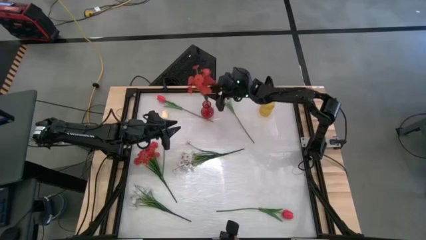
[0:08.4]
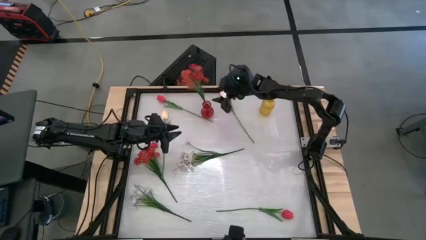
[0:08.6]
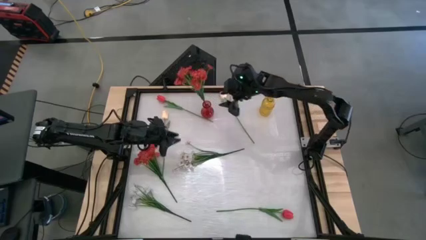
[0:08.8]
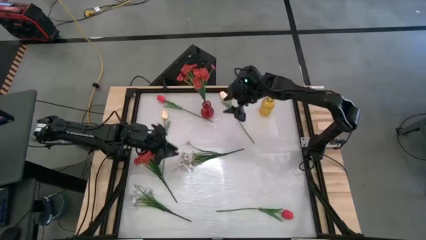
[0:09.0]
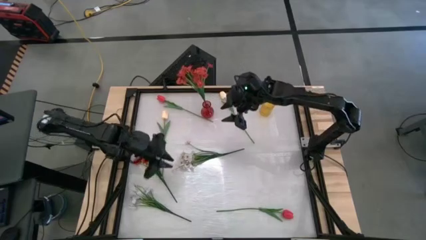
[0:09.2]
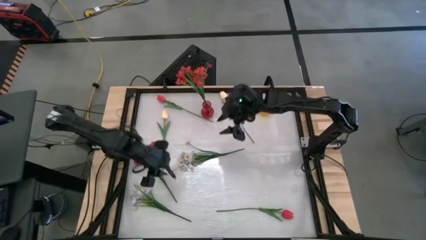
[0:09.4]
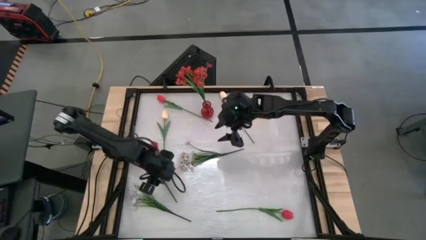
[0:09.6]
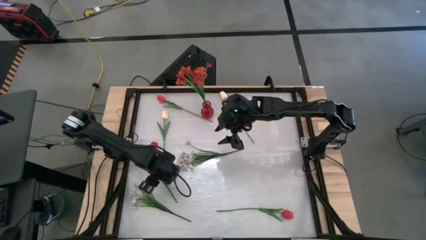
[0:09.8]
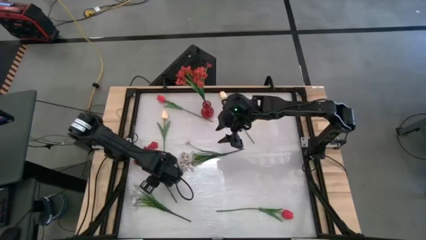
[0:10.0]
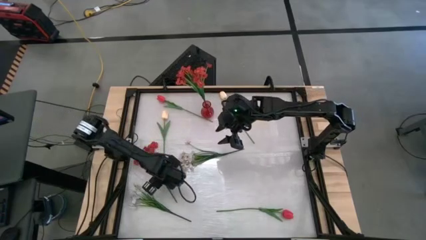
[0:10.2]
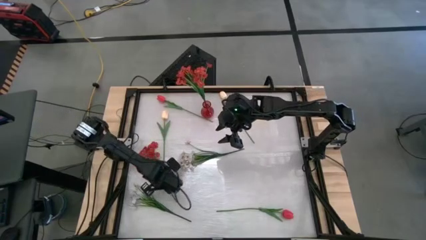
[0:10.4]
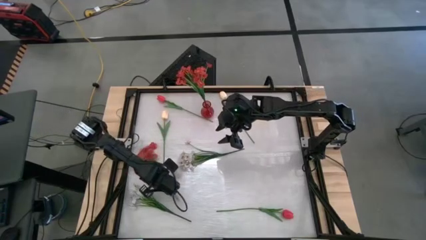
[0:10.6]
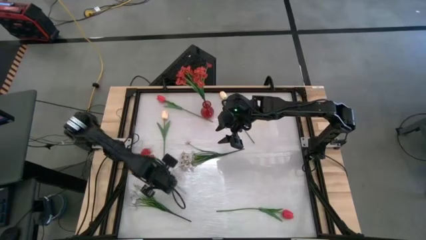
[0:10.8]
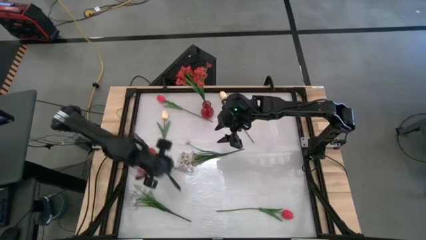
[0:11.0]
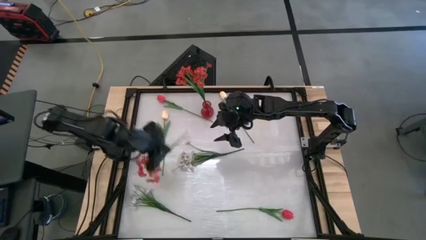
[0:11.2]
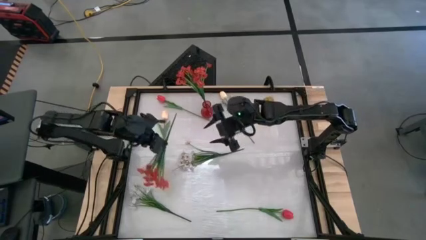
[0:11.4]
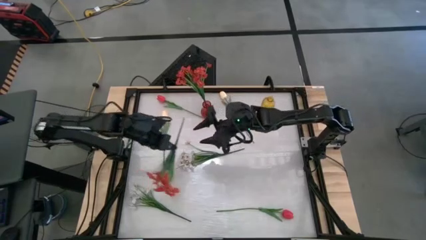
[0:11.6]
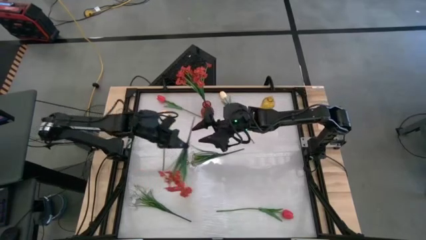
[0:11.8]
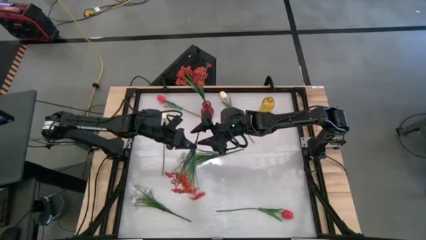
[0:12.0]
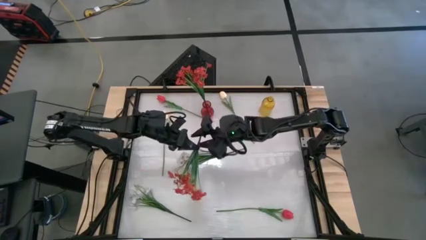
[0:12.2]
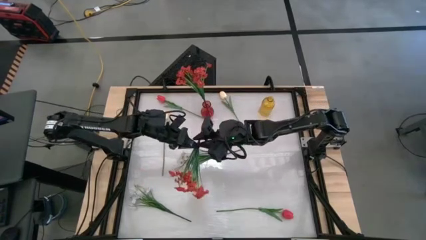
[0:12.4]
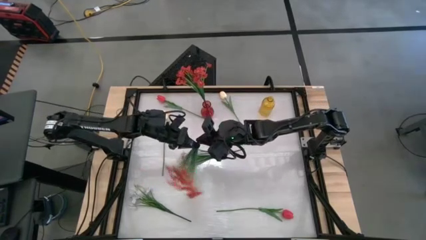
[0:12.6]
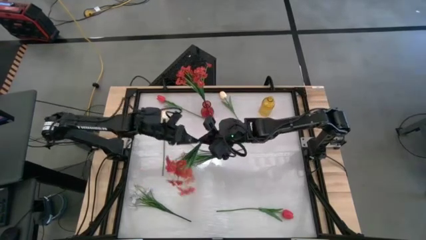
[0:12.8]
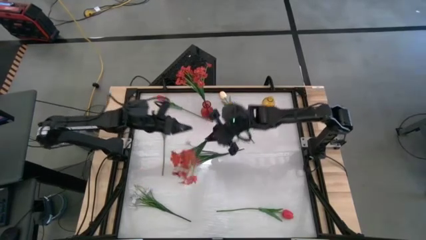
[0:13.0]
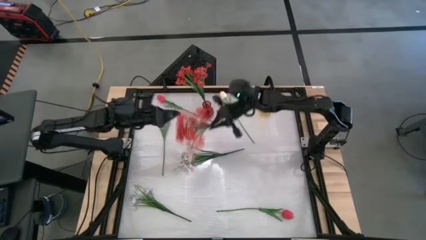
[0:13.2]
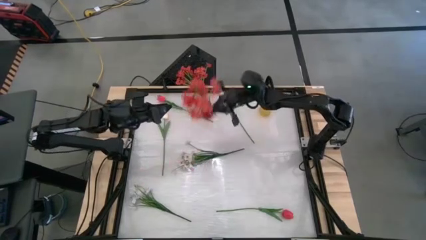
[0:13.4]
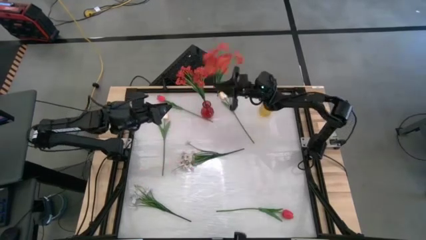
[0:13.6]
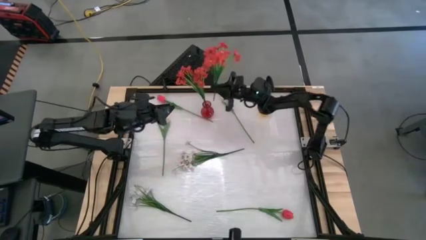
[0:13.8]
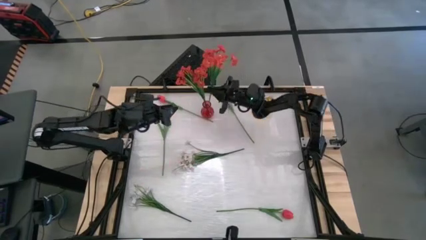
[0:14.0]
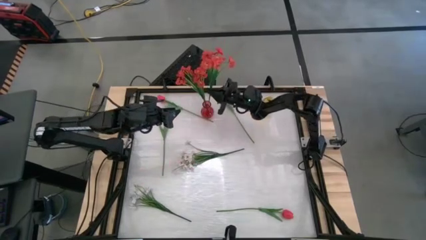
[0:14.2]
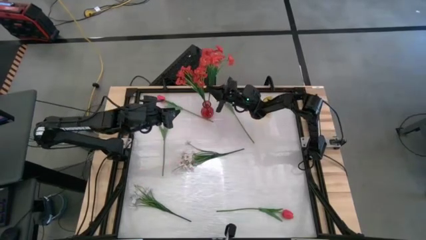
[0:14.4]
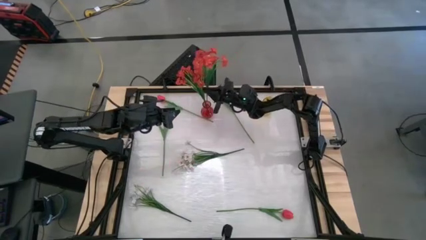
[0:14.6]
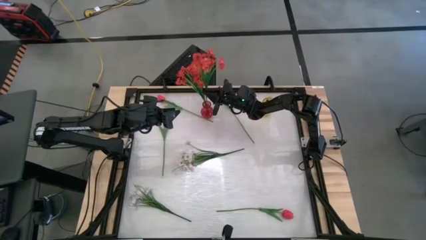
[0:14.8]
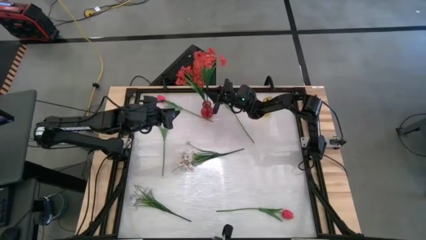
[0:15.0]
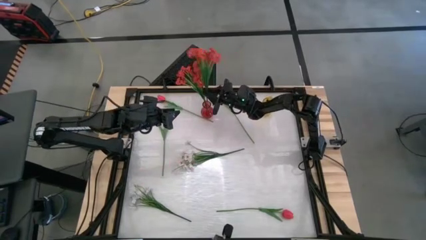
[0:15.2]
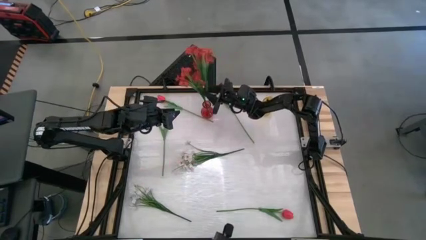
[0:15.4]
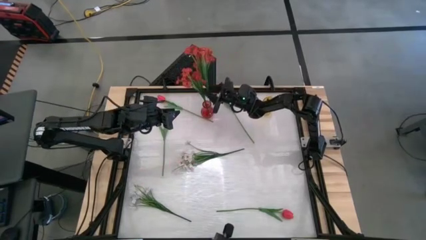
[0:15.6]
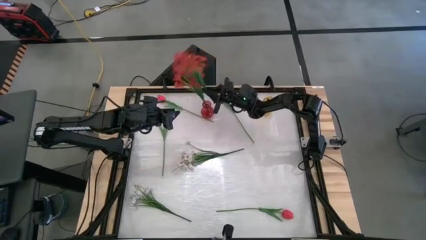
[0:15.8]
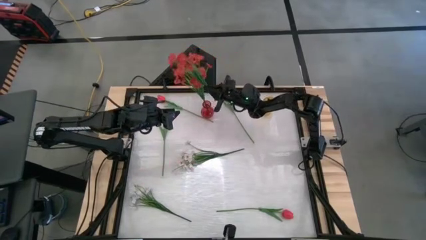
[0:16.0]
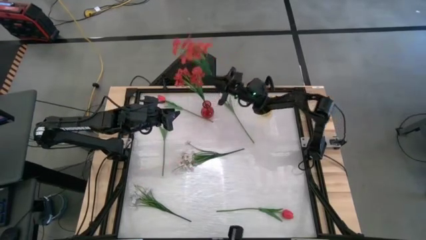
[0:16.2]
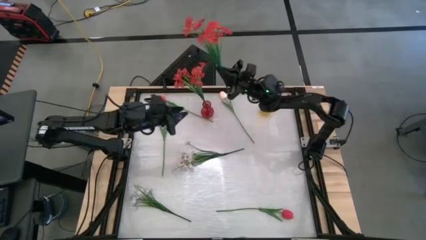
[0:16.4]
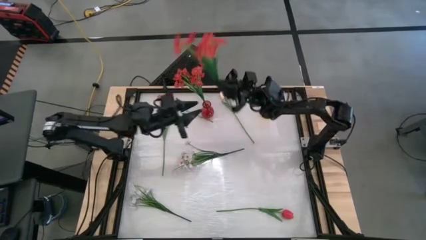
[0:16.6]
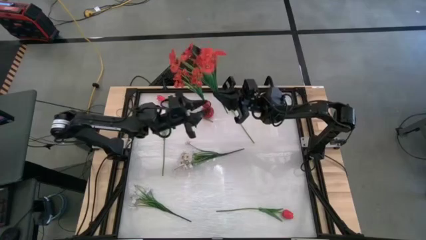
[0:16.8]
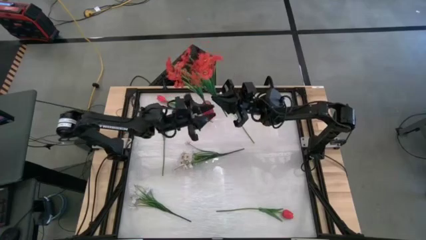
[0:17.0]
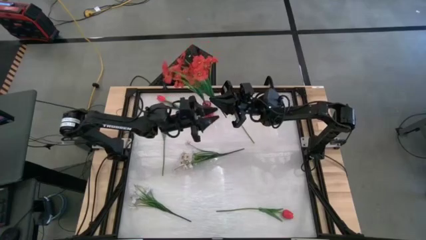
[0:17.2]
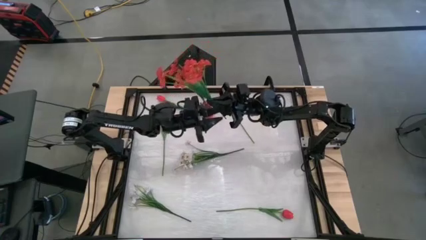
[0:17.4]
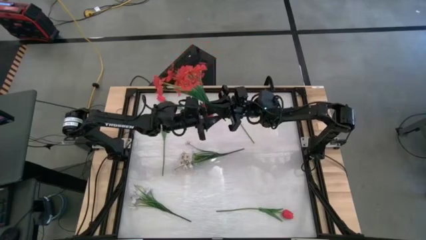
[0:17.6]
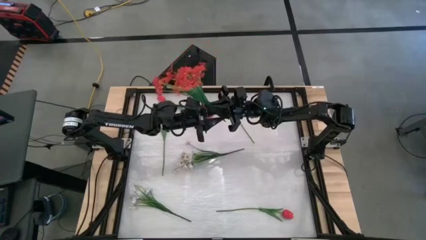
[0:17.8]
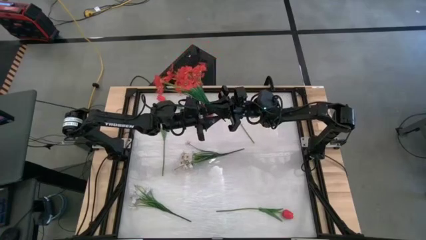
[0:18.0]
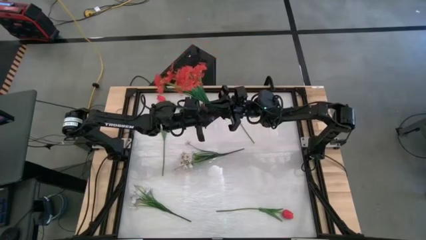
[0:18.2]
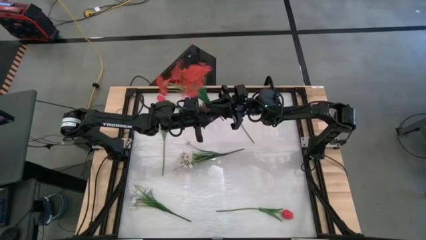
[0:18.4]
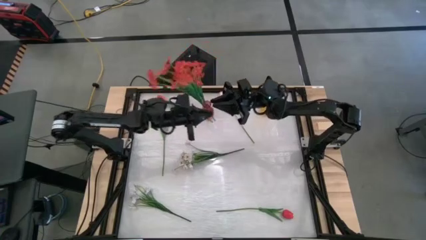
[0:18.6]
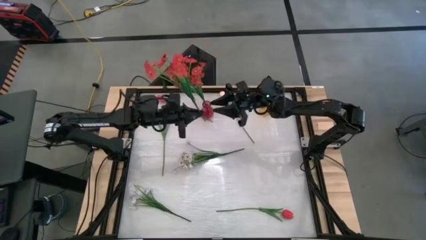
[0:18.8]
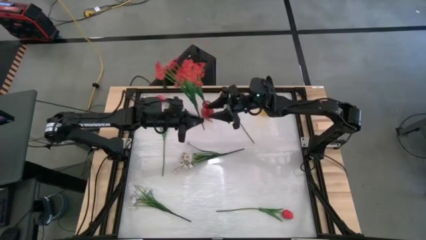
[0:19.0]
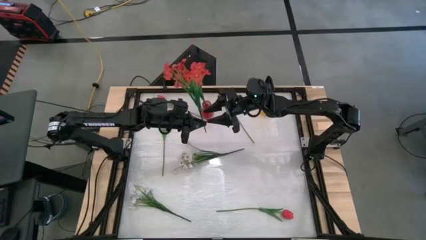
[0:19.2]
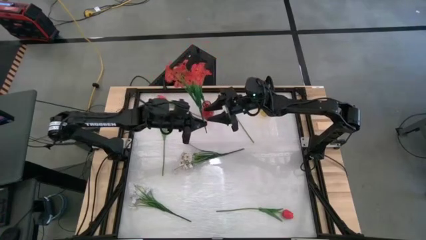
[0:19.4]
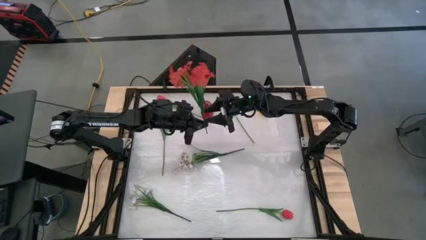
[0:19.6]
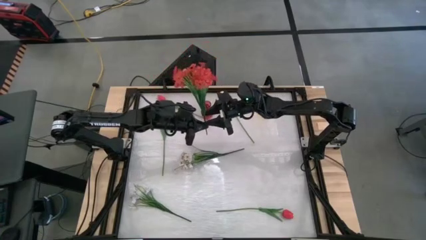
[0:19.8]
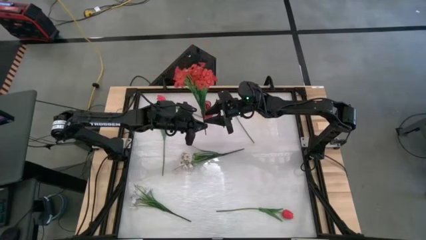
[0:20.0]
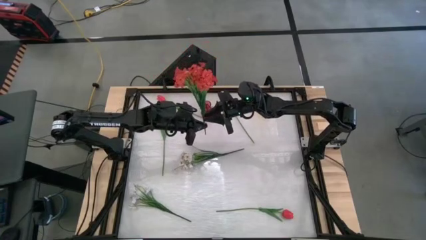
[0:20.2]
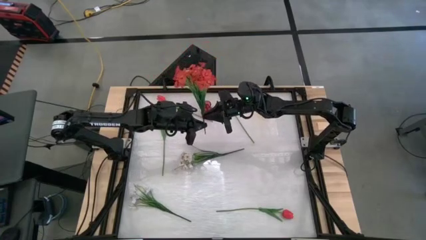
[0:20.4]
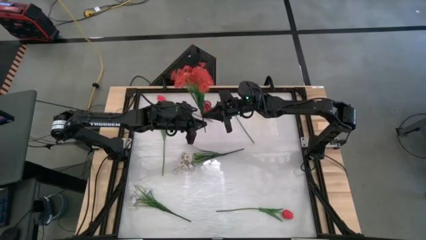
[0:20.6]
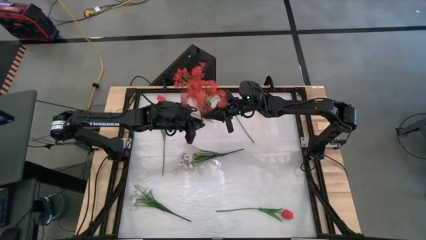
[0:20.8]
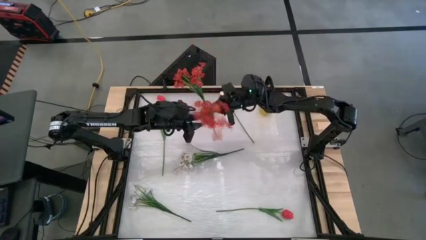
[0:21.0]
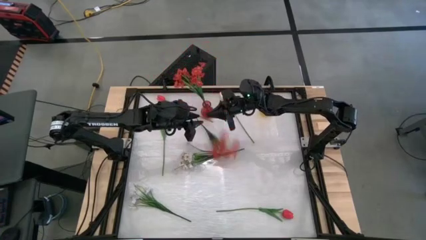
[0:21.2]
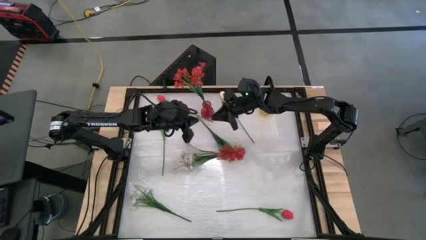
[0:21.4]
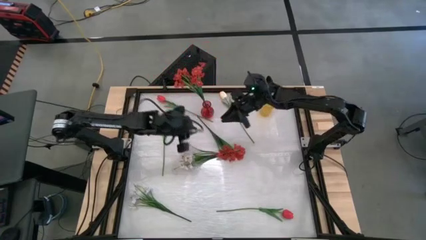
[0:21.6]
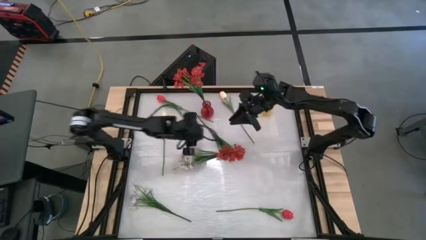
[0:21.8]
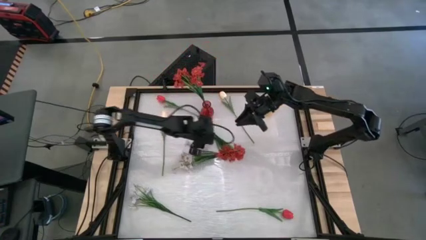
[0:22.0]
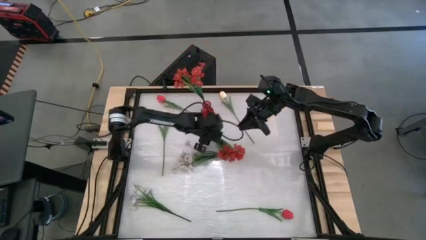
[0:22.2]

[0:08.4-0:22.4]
Task: Sort flowers into vase by color
Put the red flowers into the red vase

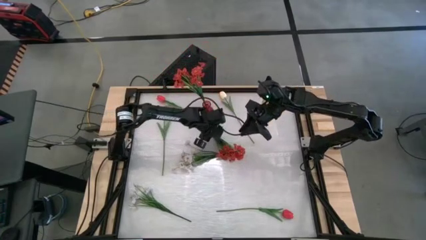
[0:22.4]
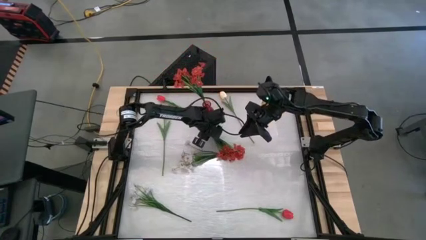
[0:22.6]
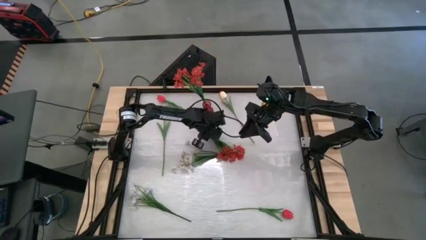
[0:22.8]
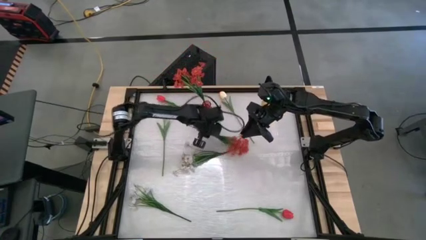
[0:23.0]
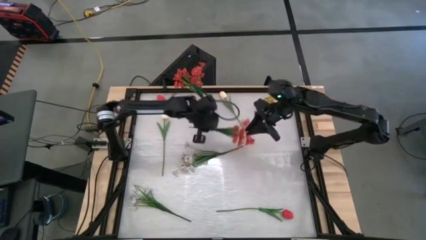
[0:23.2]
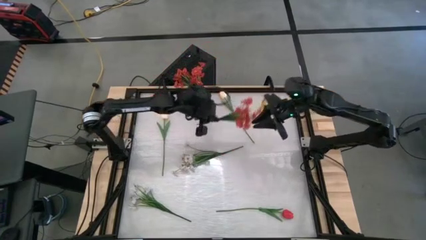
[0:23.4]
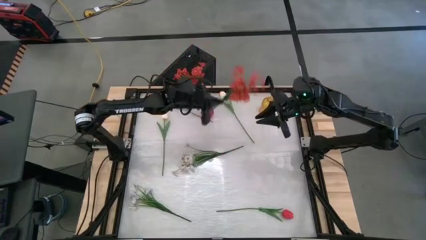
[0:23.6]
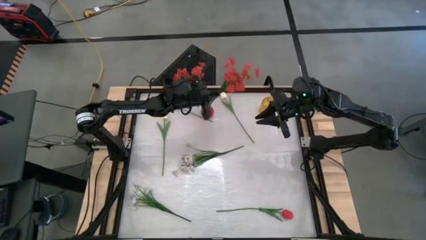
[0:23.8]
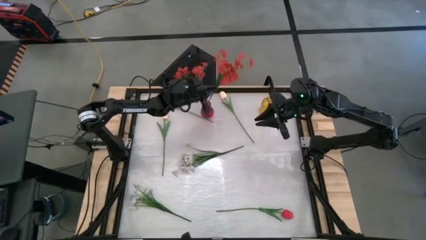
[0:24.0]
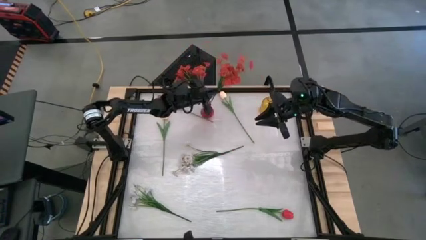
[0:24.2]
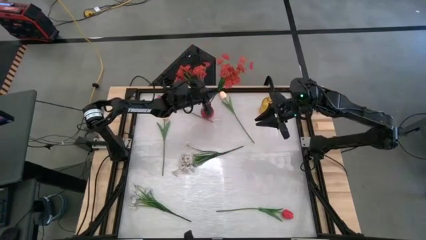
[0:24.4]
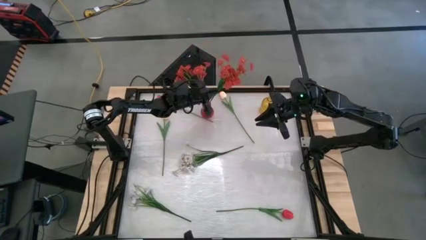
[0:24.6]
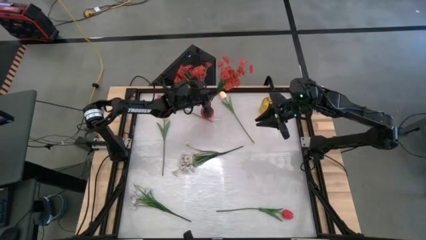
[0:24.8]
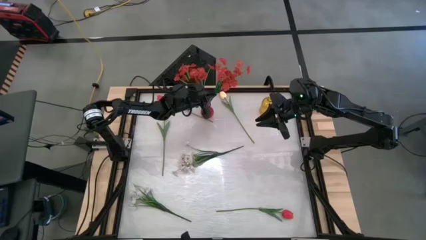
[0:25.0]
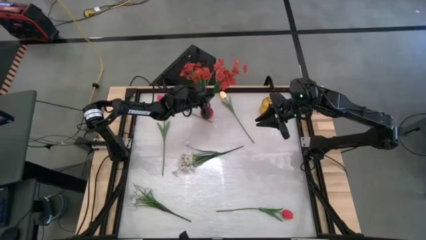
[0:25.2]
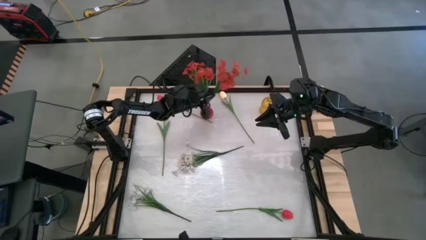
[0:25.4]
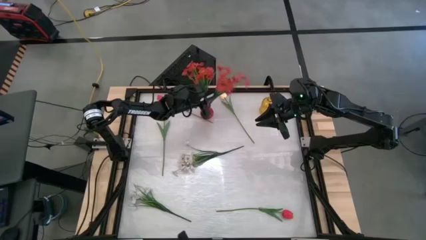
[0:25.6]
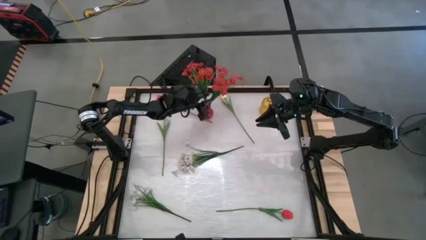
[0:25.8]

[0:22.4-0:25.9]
Put the red flowers into the red vase
